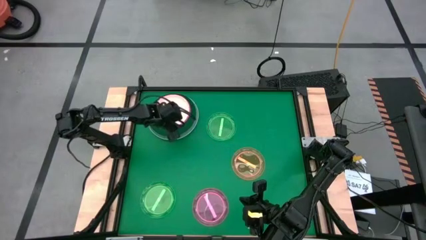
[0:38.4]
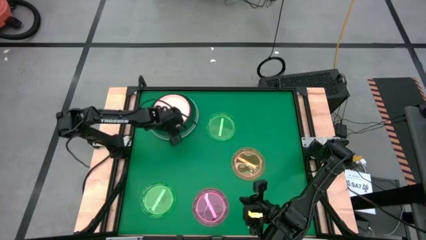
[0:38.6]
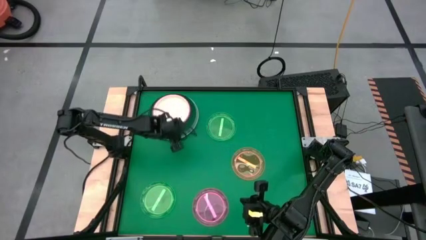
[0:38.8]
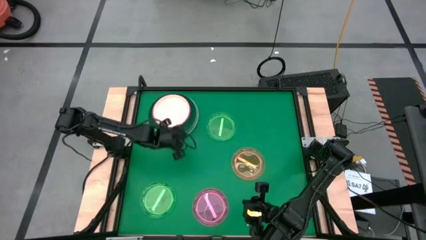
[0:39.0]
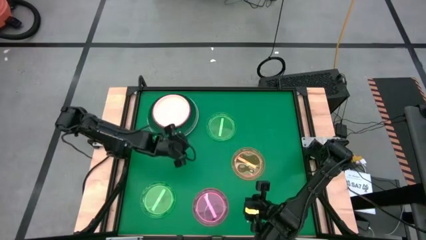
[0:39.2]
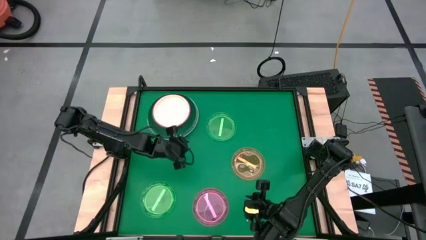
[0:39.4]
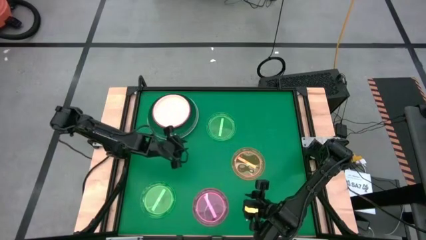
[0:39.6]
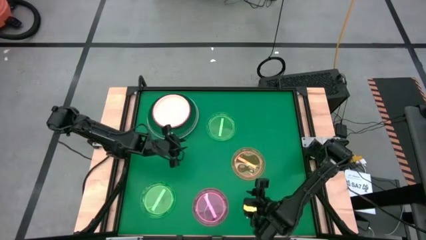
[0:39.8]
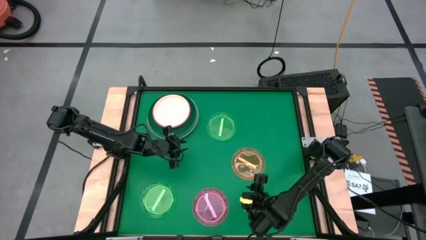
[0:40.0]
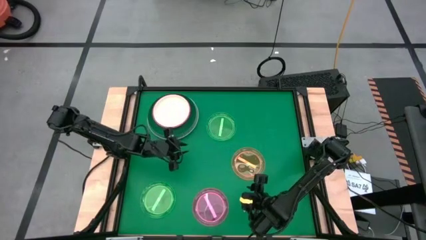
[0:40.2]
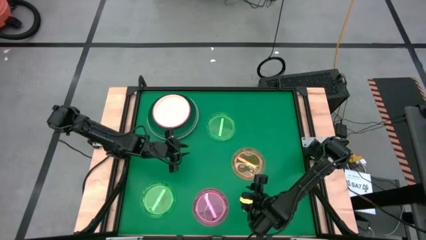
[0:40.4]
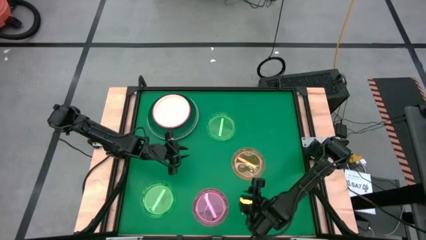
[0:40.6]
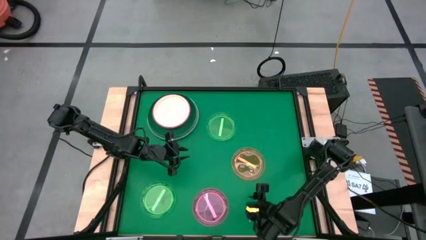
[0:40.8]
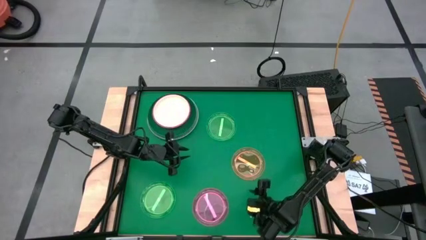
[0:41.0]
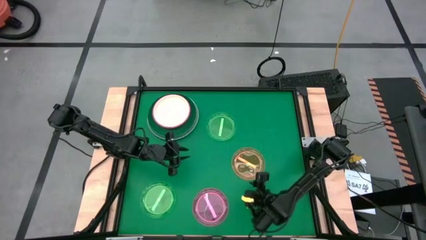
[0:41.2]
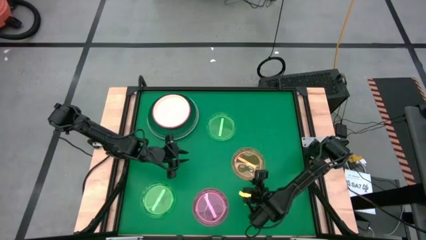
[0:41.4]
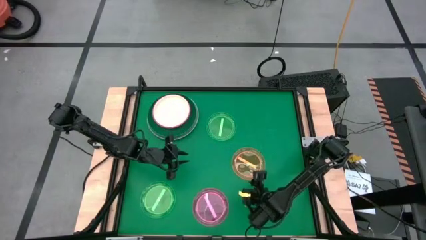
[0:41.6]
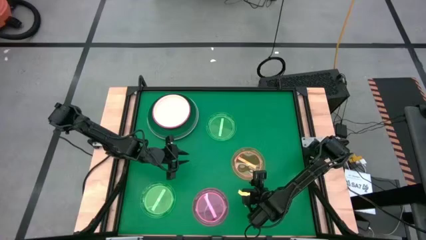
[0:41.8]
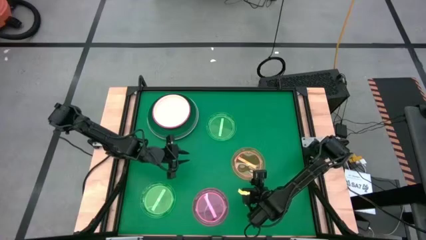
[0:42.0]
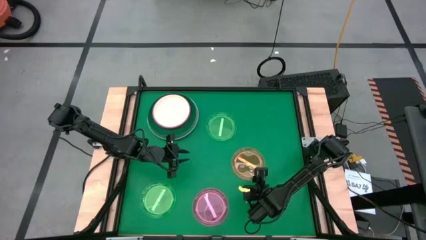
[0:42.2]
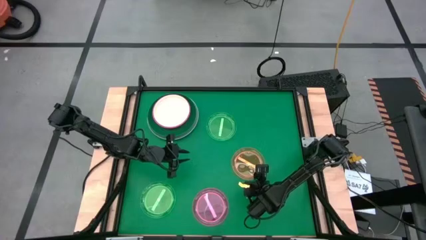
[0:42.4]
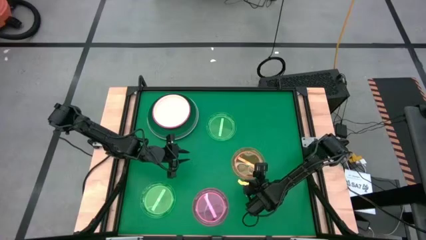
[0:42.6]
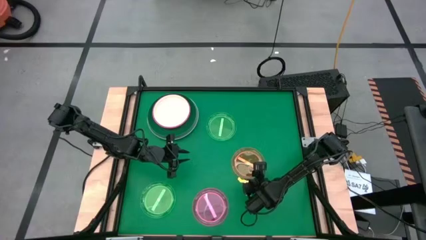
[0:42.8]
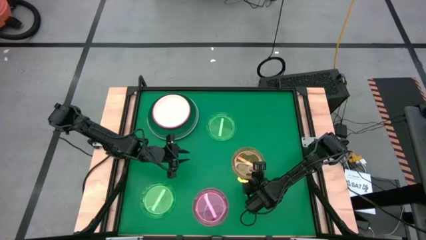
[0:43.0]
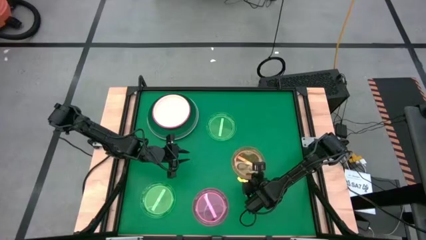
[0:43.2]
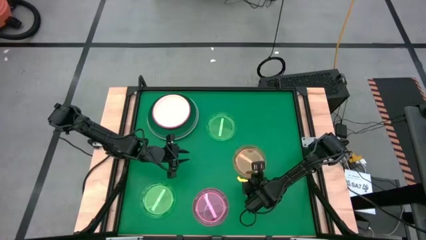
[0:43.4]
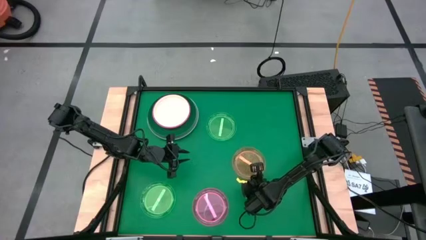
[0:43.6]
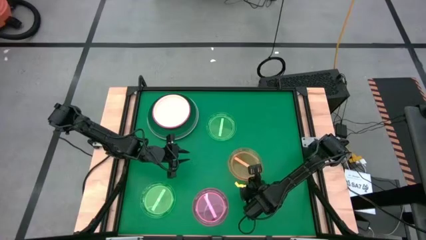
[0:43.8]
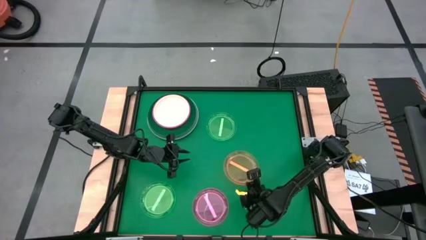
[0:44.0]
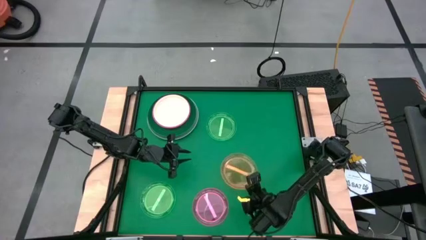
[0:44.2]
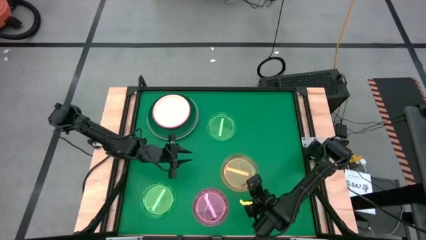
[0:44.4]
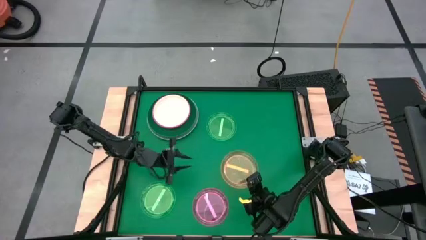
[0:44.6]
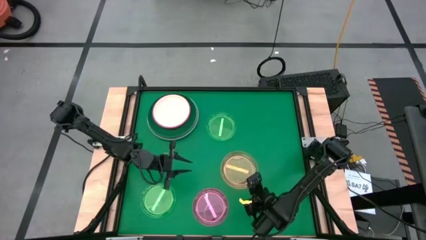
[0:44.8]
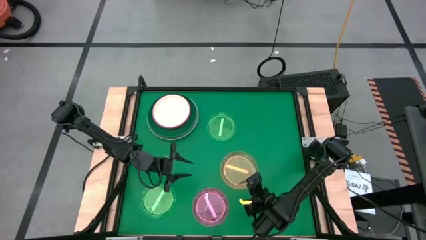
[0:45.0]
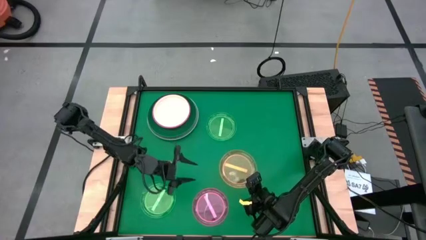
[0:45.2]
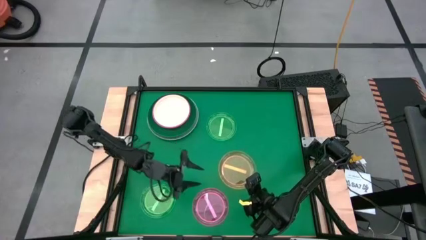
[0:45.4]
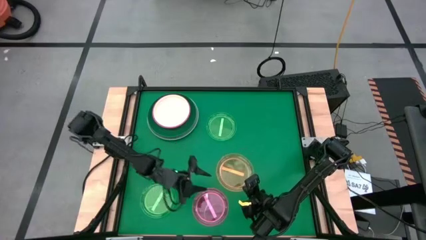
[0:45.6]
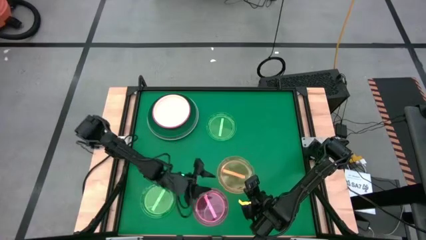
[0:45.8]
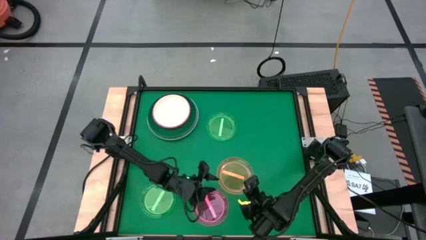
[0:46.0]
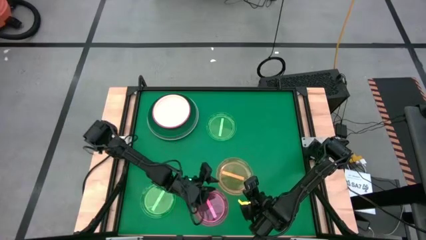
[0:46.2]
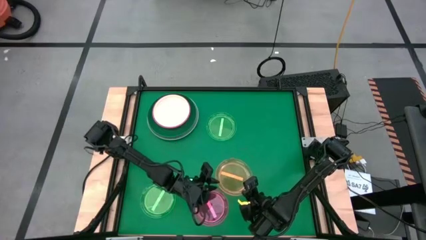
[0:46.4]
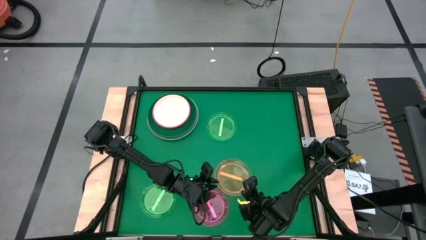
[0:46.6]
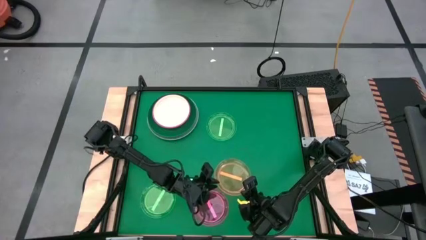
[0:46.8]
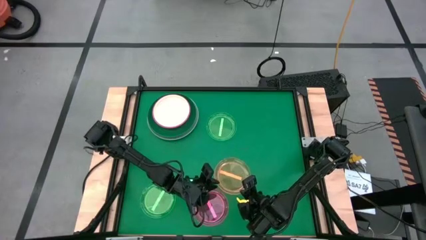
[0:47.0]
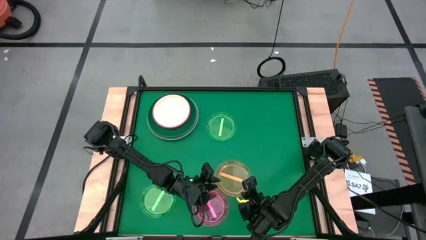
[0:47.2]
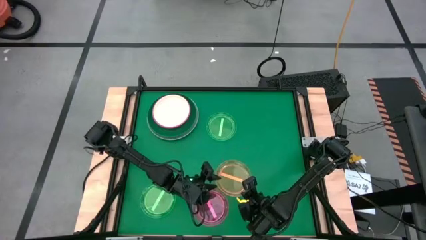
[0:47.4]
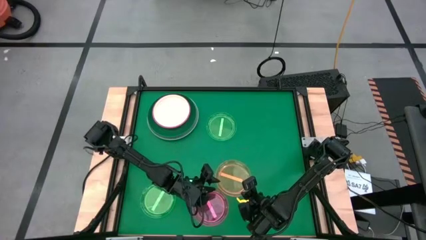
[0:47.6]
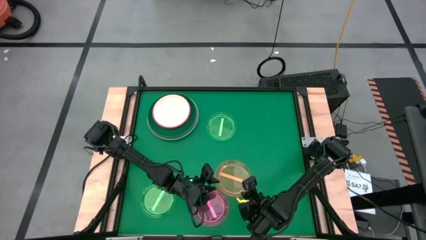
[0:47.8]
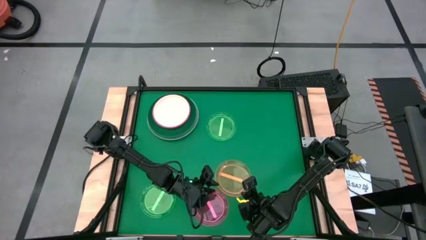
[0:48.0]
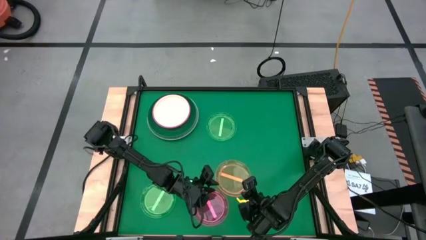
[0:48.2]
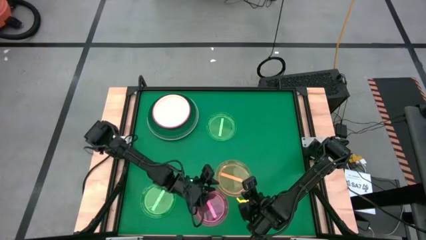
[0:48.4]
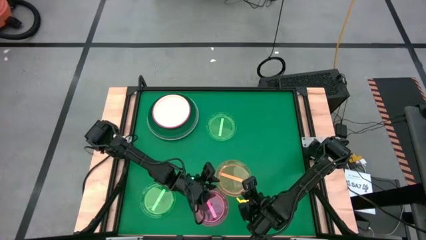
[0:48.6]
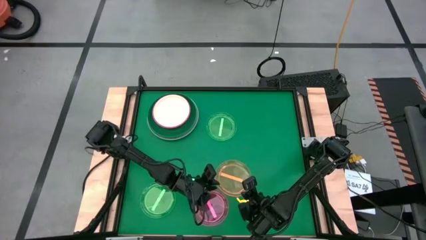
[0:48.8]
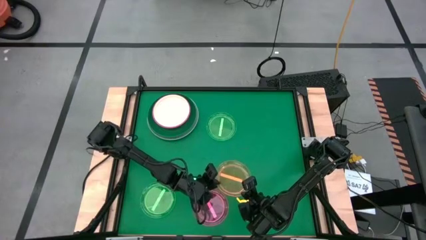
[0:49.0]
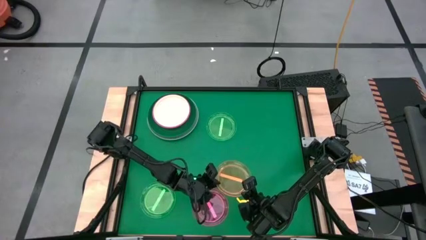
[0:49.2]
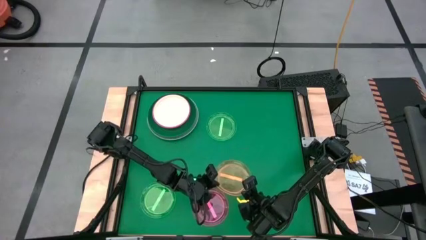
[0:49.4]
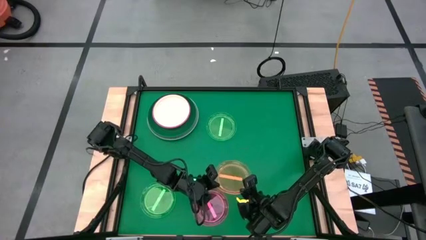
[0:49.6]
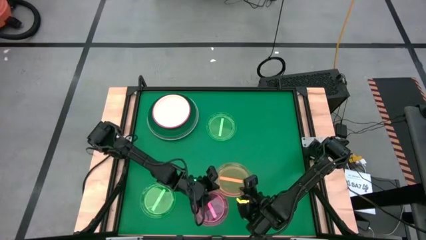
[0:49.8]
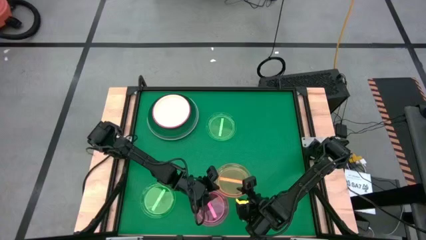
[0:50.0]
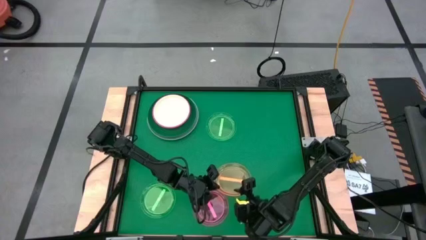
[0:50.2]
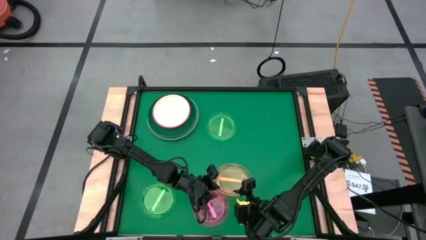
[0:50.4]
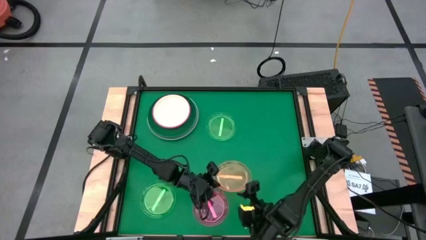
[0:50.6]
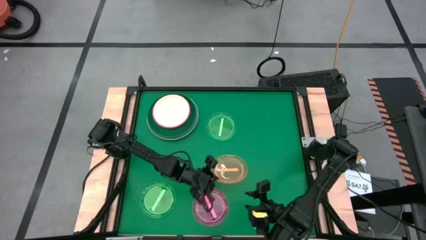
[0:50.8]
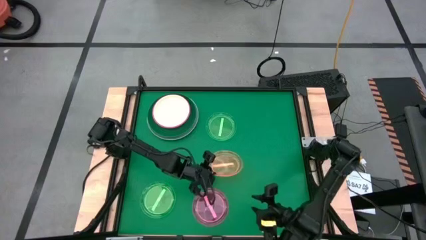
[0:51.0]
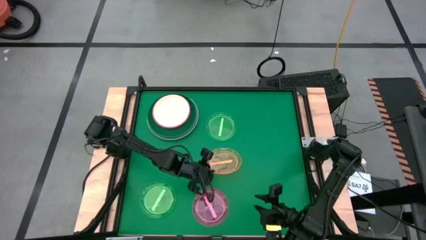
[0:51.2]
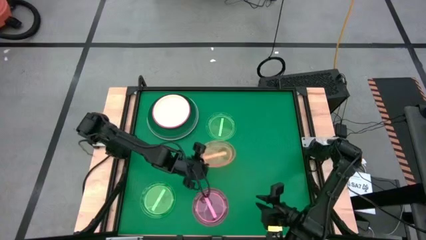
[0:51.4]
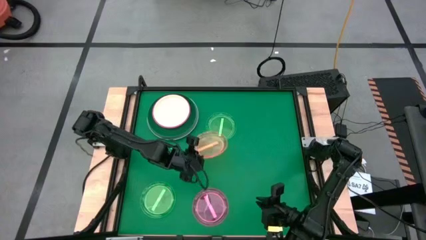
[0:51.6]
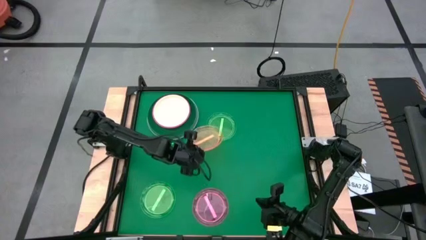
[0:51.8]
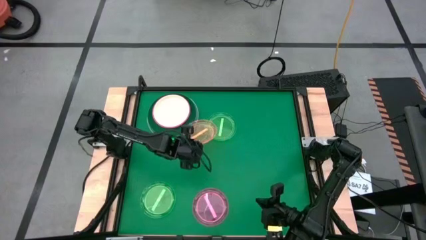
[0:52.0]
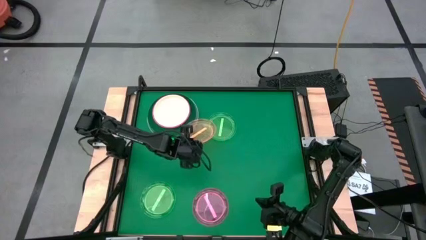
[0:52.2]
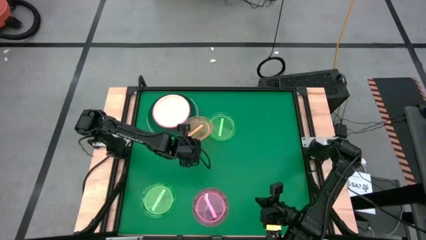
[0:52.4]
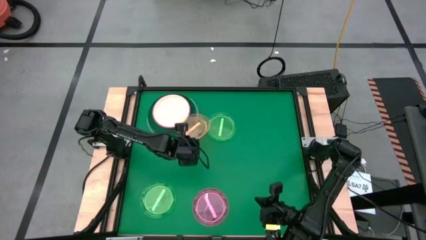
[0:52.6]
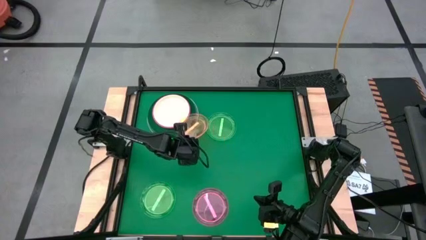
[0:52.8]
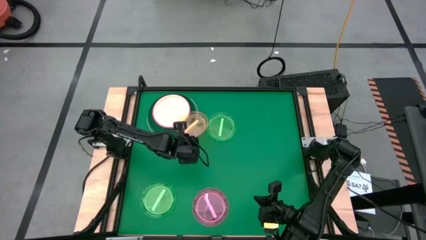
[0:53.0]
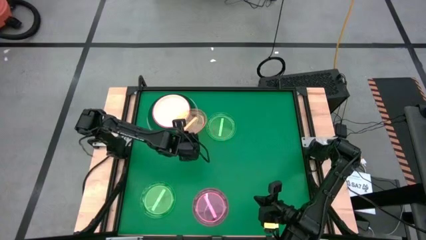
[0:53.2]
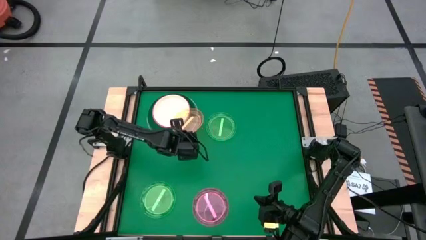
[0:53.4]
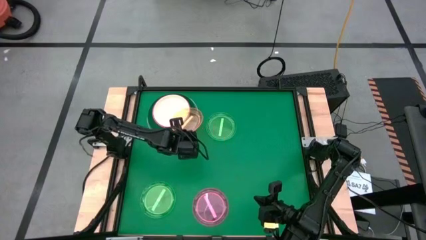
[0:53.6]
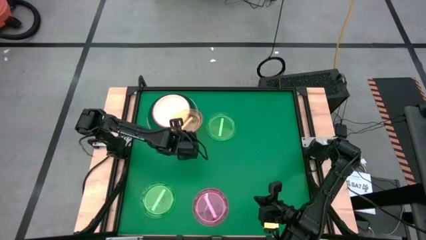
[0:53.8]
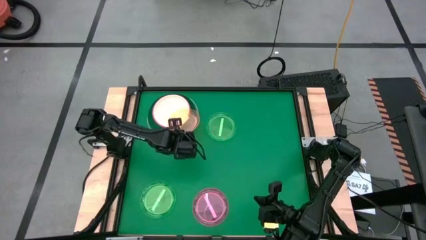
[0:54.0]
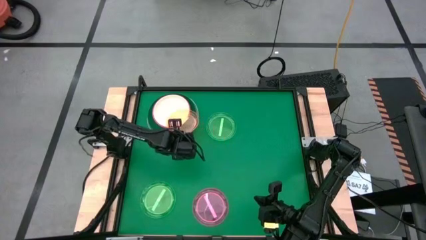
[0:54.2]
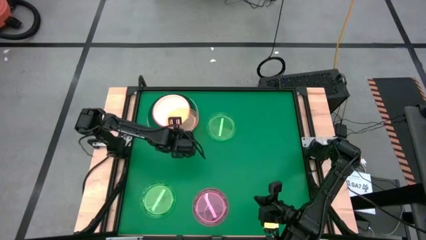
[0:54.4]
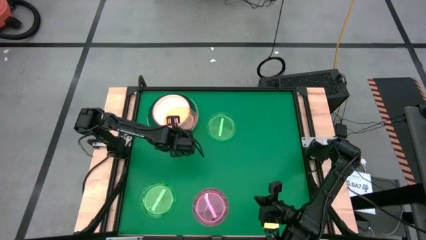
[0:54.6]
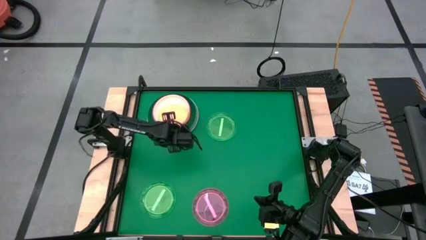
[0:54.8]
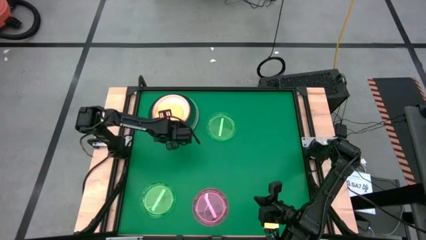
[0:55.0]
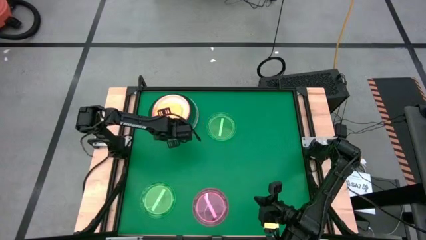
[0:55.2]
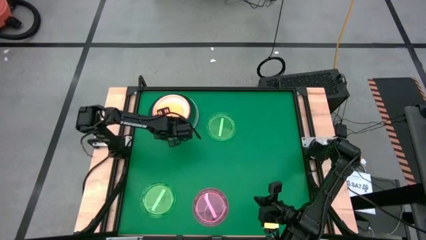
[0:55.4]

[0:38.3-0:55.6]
Task: Stack plastic plates
Stack the orange transparent plate on the white plate
